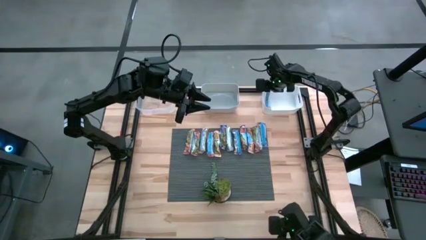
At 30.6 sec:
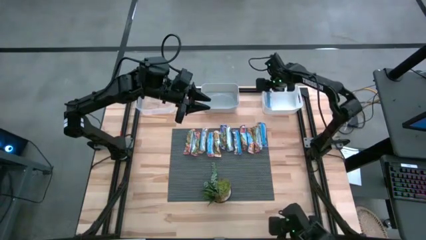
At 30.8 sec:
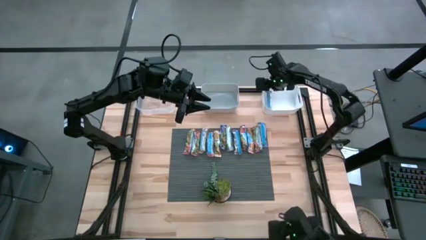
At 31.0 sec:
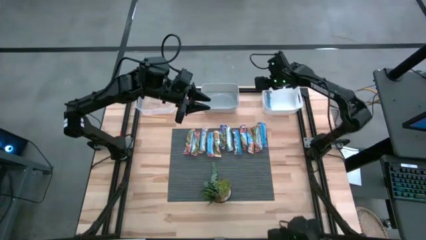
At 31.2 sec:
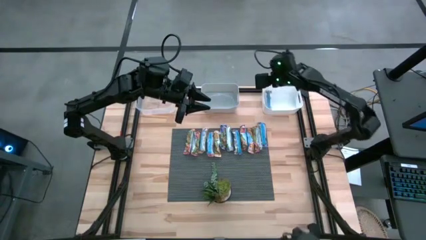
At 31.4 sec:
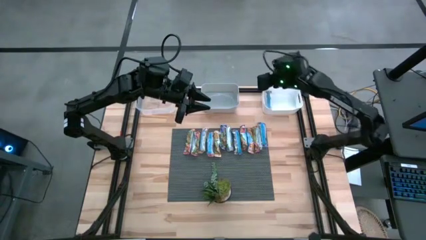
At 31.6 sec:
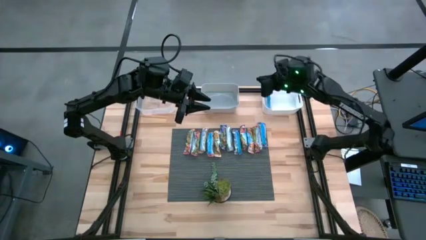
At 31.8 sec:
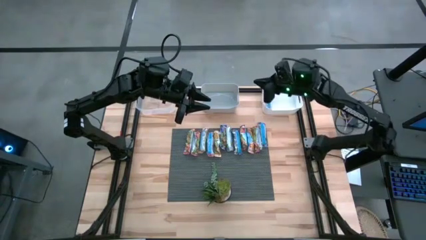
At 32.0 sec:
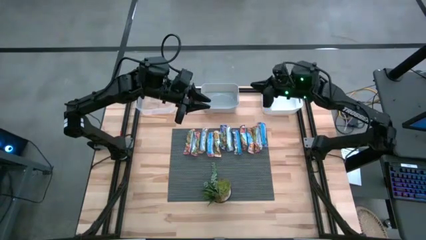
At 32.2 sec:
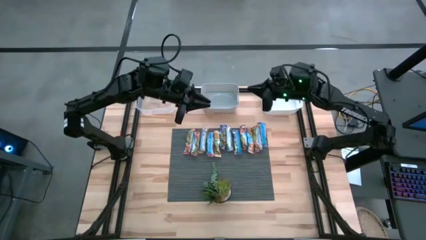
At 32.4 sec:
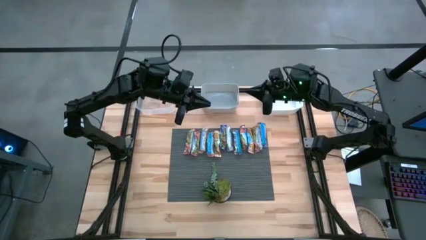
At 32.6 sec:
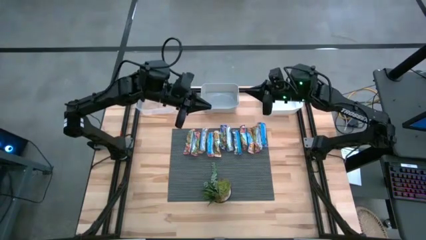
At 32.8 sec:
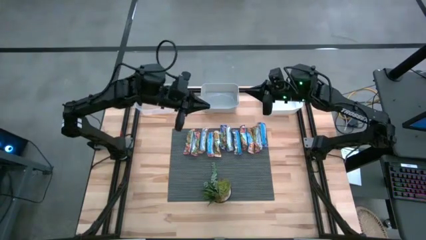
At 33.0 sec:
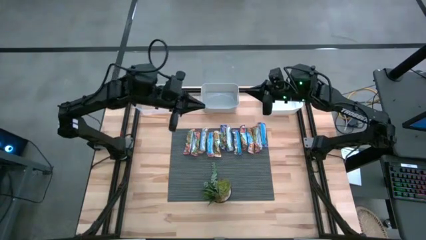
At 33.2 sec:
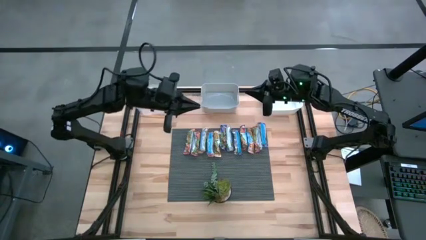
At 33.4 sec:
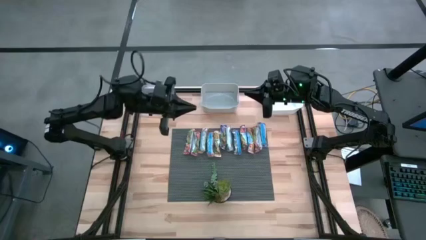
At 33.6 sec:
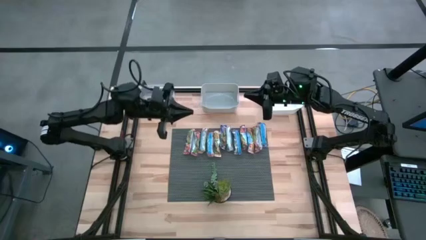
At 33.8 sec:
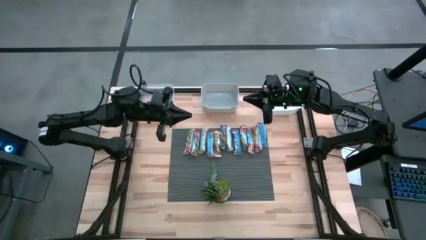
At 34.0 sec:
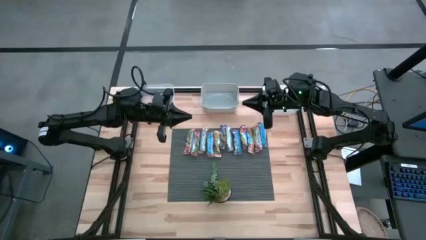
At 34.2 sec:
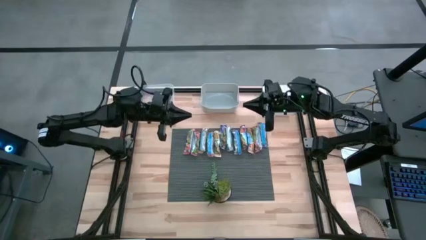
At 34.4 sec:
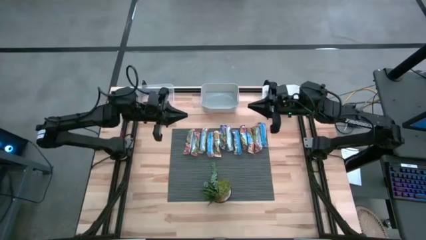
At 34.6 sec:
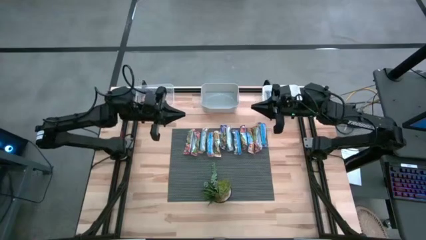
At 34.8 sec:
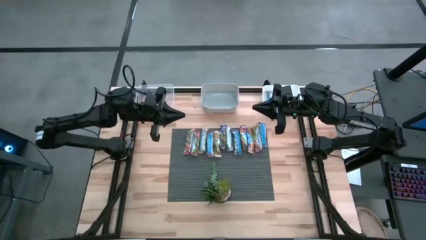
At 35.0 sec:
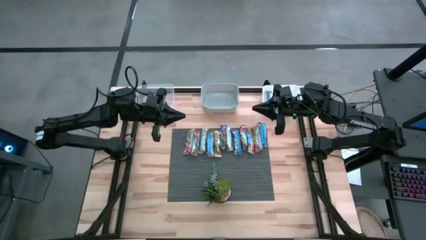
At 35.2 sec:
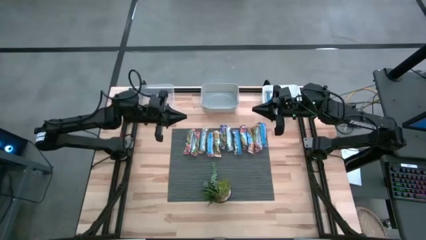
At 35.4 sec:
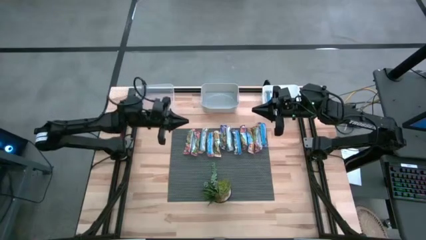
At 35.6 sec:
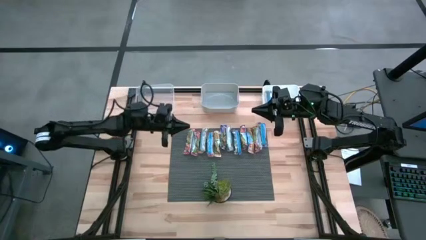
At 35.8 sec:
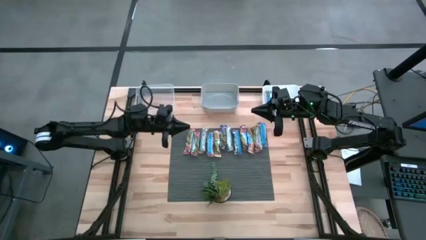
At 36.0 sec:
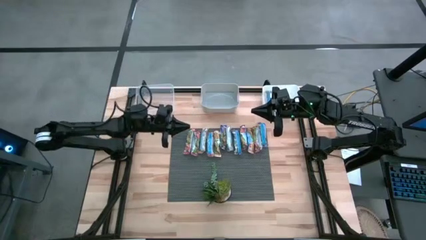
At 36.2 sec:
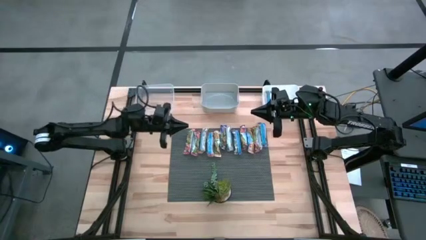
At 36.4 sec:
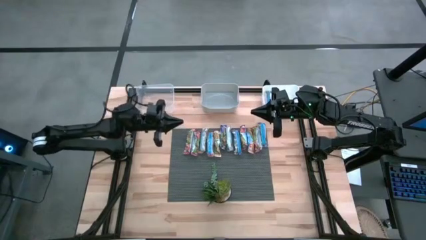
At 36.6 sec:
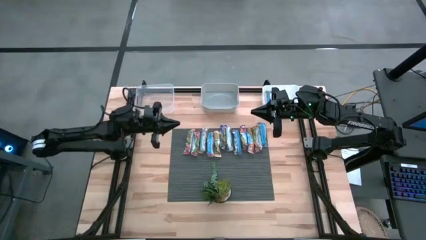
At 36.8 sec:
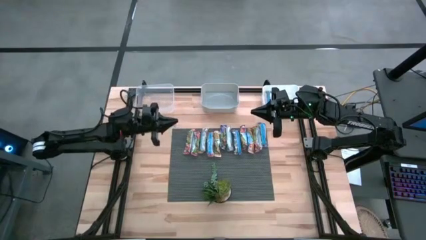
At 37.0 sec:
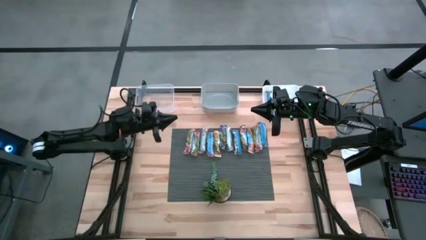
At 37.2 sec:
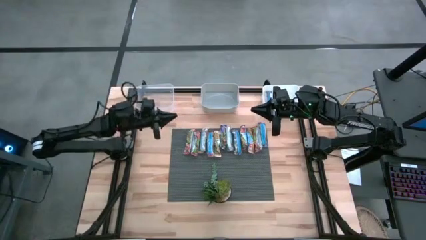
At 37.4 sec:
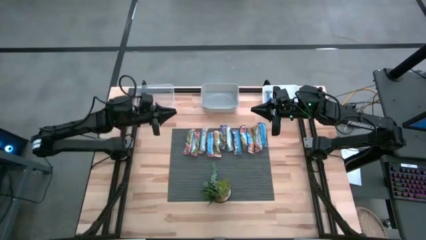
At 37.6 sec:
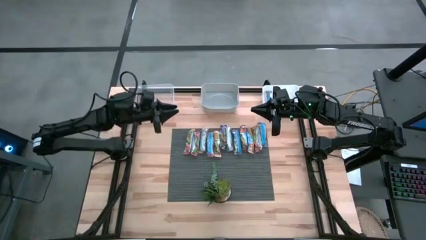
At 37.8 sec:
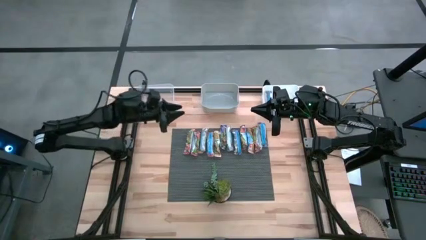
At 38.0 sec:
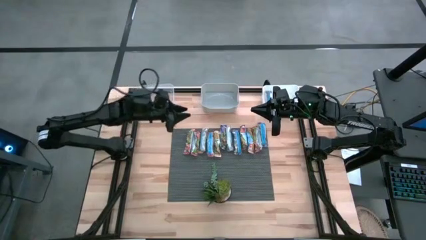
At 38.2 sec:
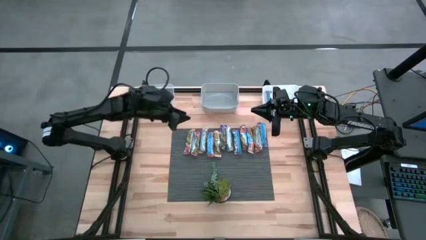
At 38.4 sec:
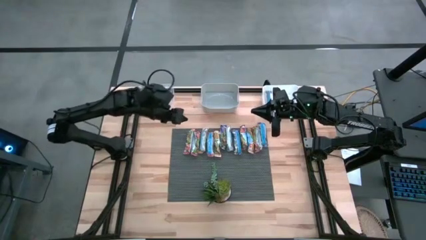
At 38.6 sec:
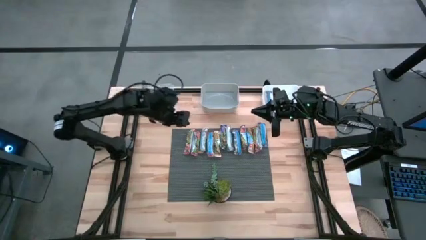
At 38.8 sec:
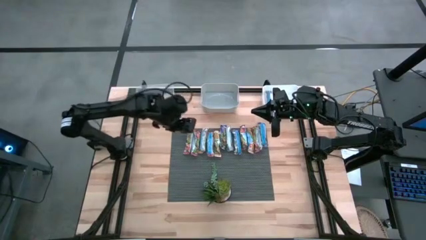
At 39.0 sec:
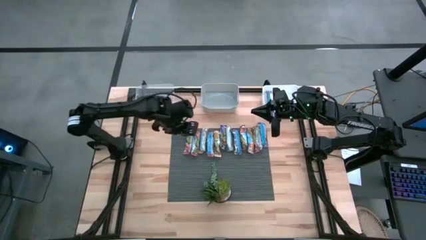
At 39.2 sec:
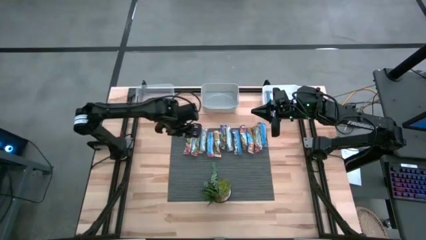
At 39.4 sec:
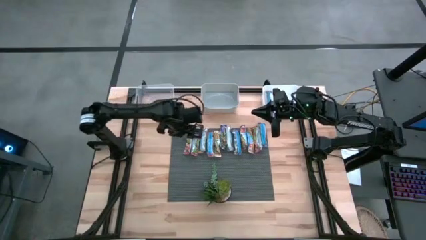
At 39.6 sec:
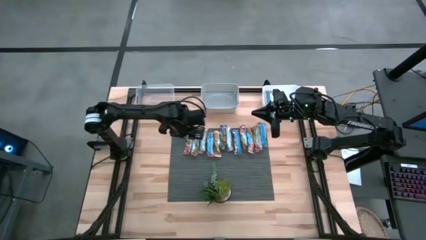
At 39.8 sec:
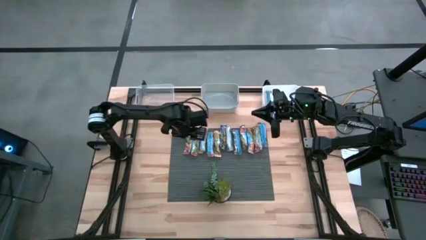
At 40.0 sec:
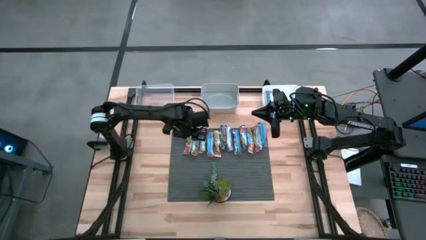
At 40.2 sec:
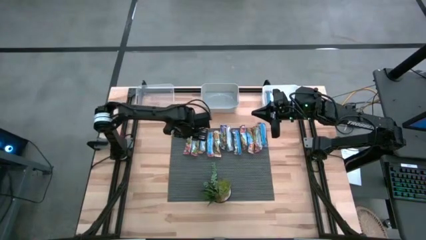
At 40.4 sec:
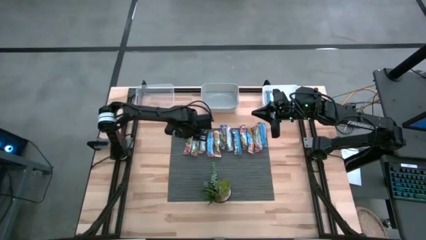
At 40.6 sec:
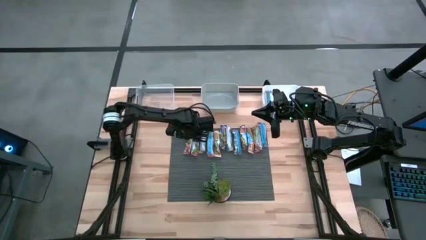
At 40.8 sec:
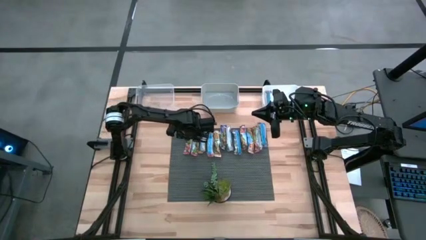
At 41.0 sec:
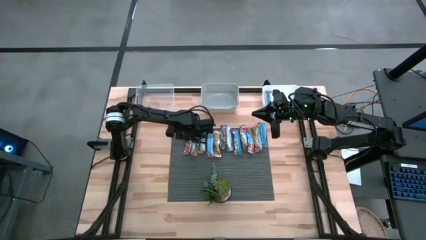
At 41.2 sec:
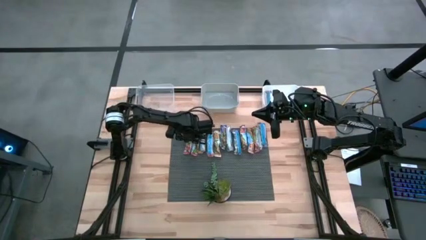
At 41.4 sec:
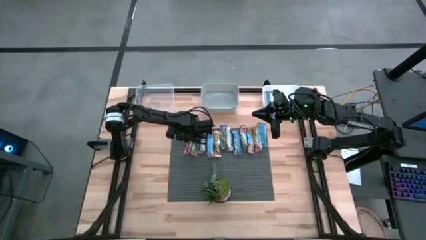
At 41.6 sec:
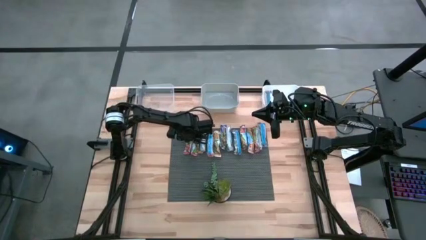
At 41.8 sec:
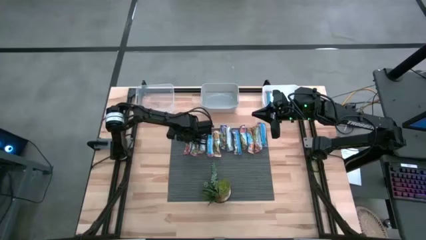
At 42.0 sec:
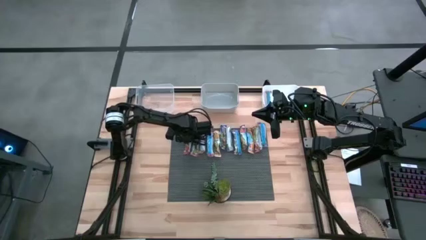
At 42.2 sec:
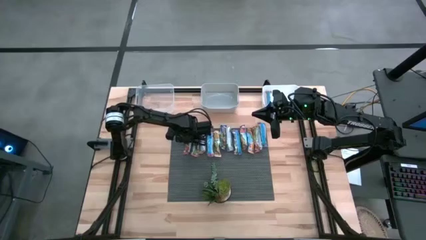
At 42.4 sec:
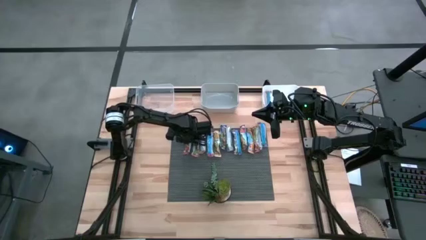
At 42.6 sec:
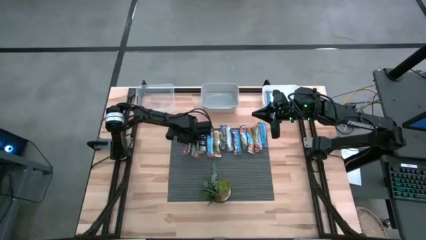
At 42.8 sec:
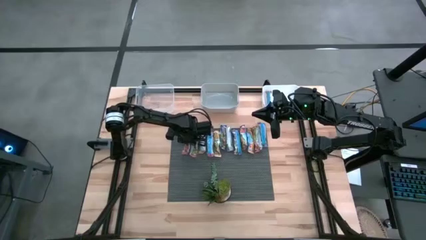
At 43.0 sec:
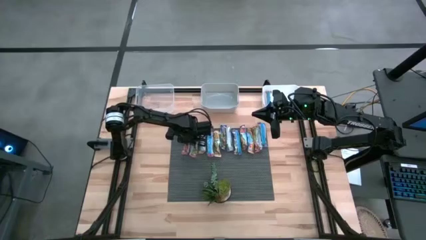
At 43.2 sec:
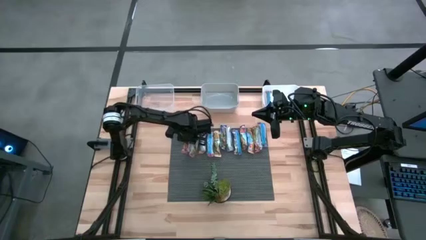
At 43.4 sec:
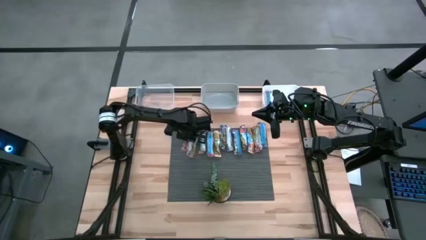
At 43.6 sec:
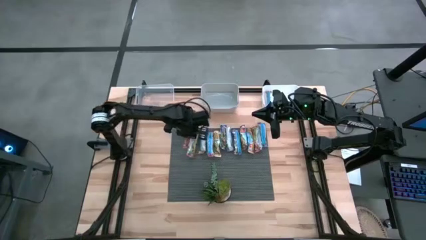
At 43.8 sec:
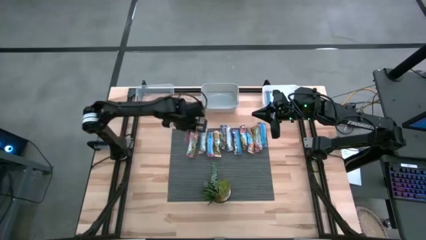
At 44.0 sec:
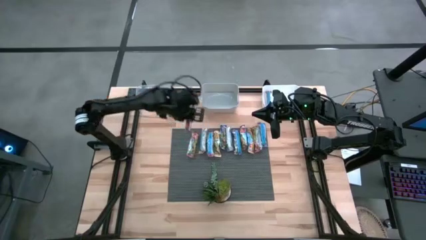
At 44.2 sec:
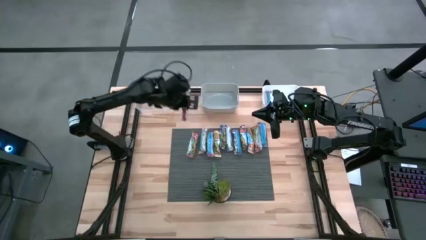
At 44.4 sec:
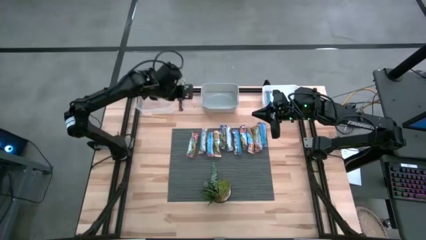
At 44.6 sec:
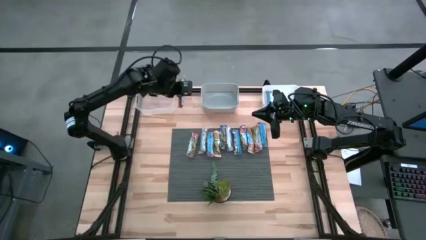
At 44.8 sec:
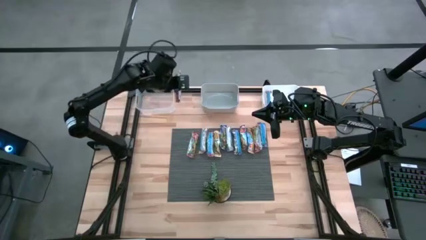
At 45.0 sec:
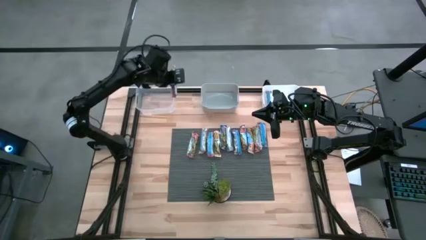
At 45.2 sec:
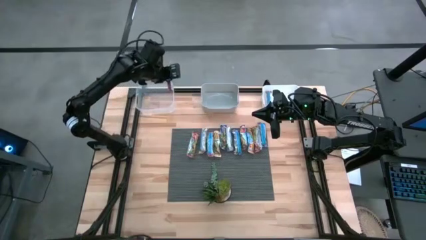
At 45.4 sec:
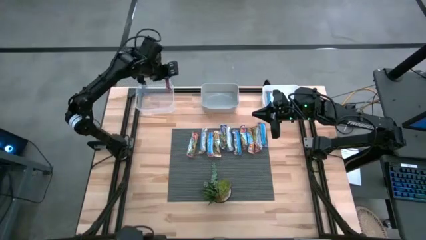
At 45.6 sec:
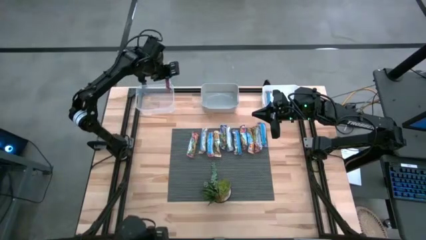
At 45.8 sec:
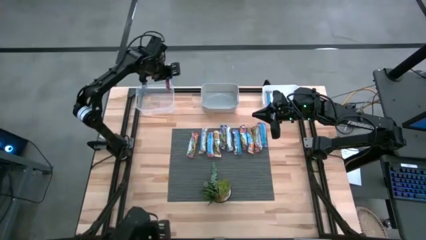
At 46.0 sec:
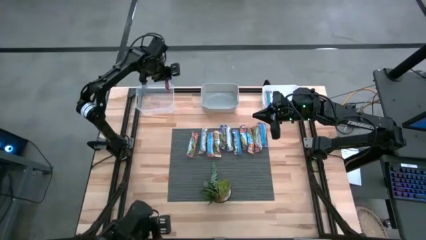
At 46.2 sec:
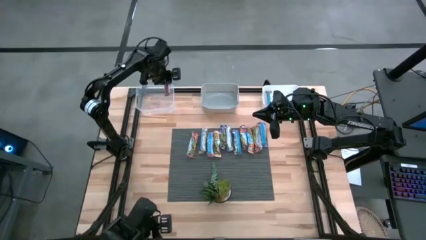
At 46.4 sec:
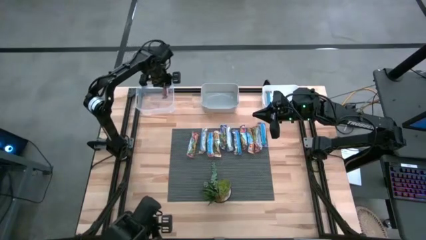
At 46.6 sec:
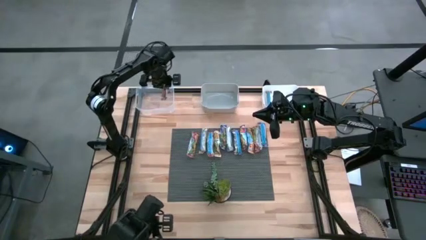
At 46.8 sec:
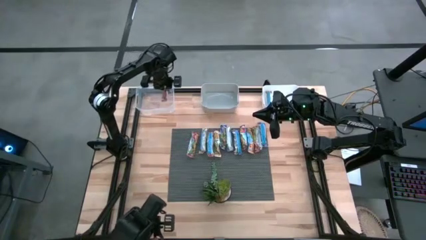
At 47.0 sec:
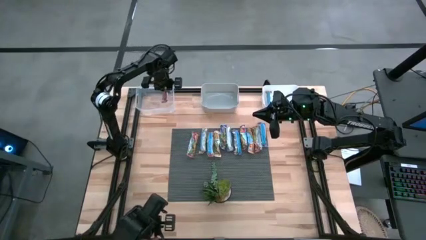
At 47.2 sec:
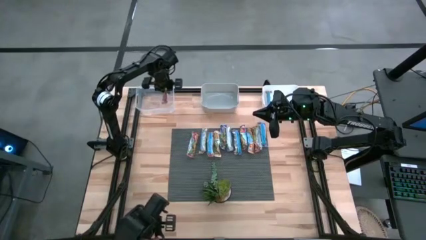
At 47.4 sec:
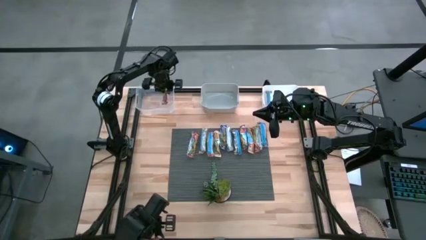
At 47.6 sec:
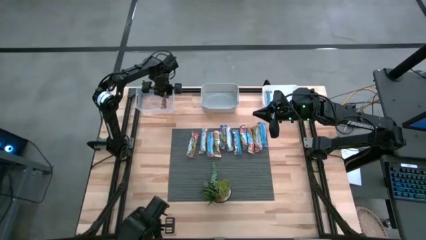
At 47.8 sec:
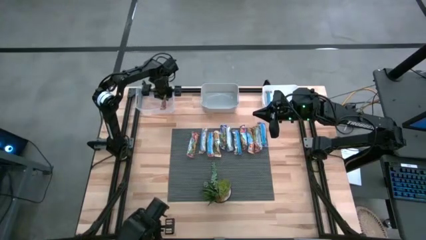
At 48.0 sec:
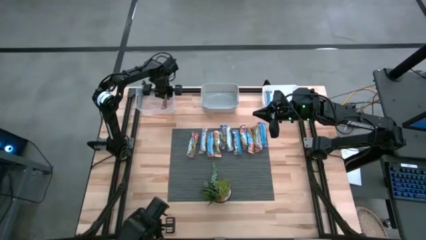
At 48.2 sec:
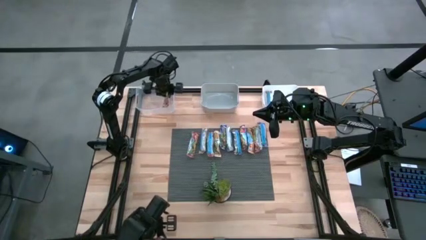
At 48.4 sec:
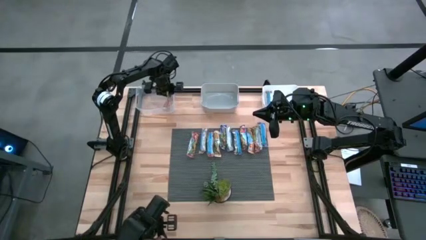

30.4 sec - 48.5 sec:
Task: Pick and place Granola Bars by type
Put the red granola bar into the transparent bin
